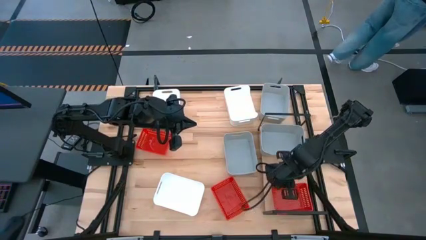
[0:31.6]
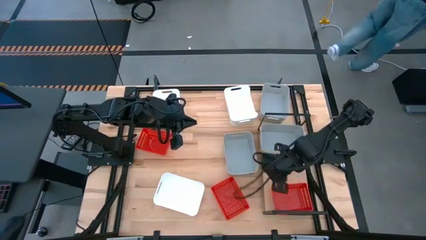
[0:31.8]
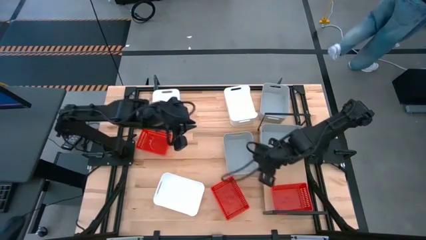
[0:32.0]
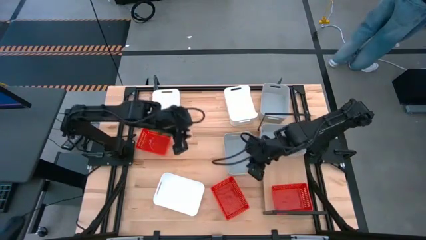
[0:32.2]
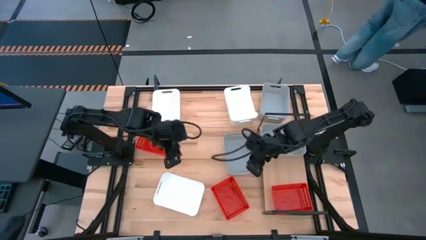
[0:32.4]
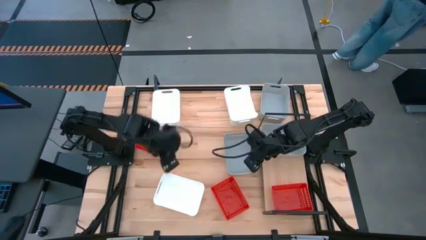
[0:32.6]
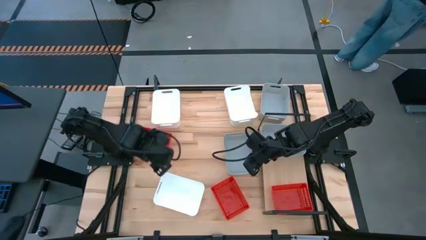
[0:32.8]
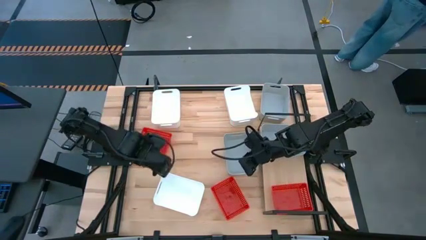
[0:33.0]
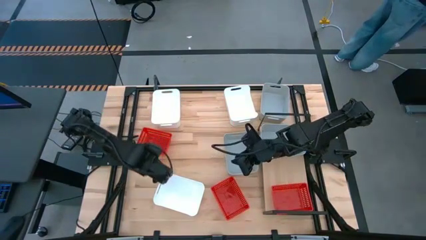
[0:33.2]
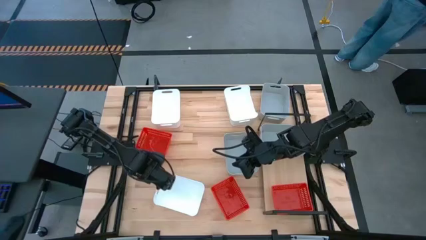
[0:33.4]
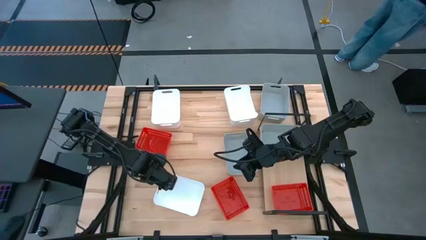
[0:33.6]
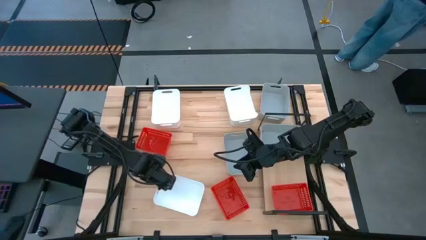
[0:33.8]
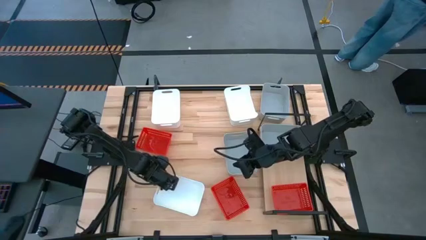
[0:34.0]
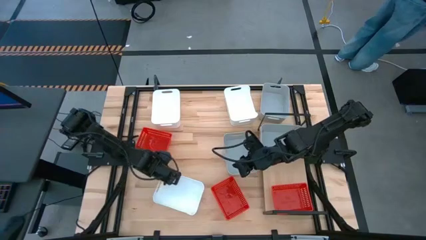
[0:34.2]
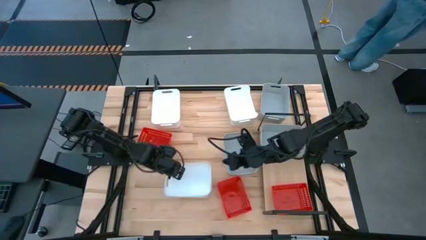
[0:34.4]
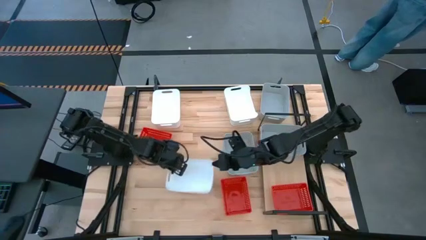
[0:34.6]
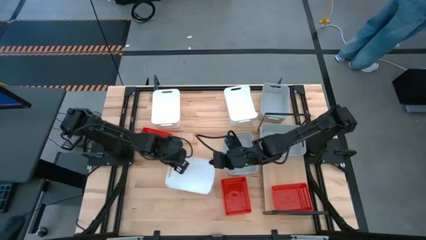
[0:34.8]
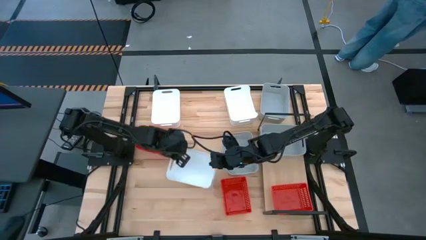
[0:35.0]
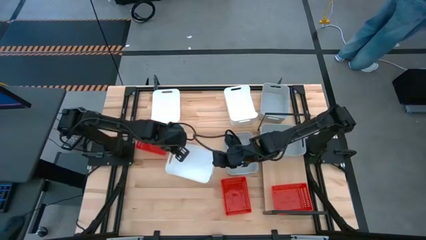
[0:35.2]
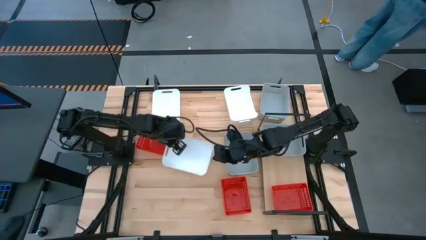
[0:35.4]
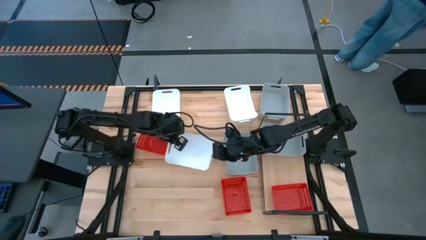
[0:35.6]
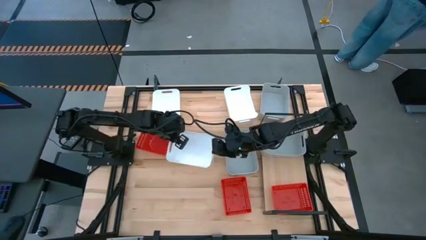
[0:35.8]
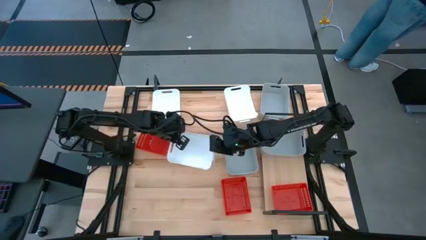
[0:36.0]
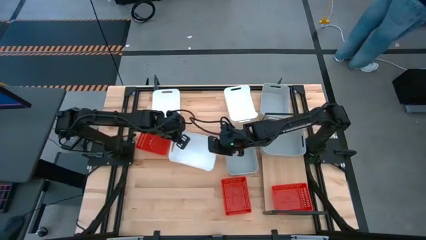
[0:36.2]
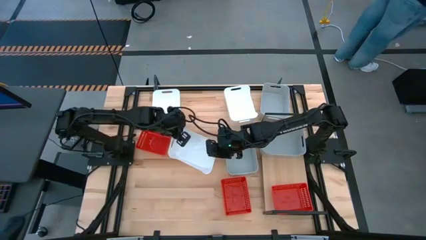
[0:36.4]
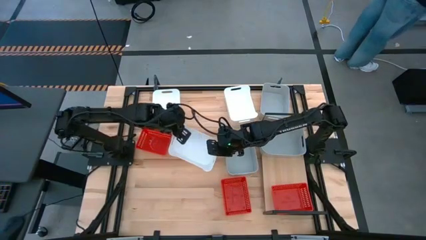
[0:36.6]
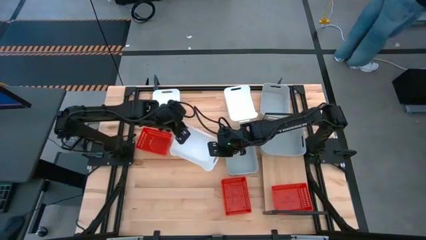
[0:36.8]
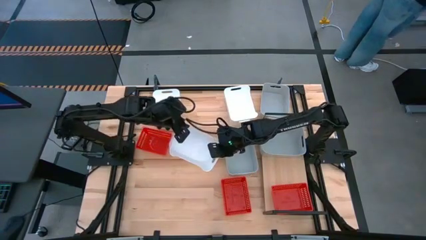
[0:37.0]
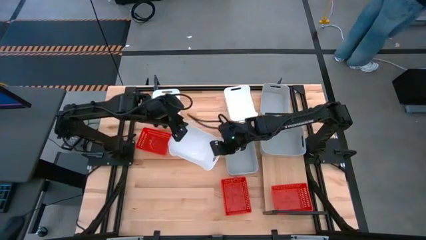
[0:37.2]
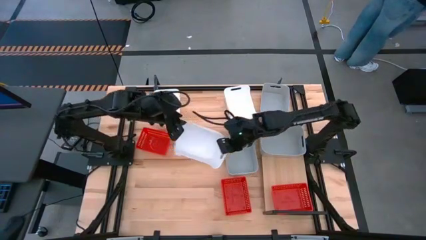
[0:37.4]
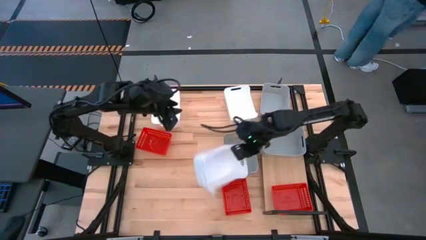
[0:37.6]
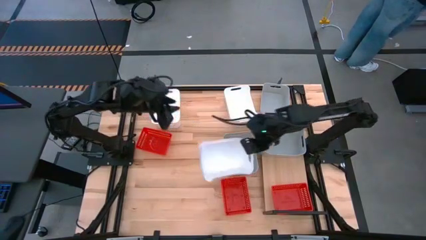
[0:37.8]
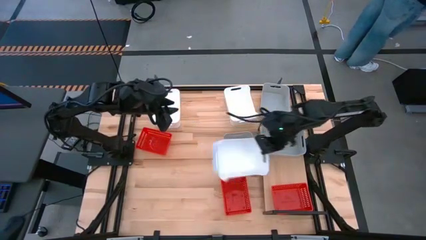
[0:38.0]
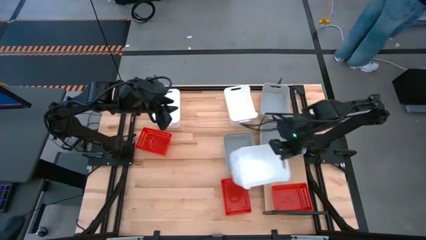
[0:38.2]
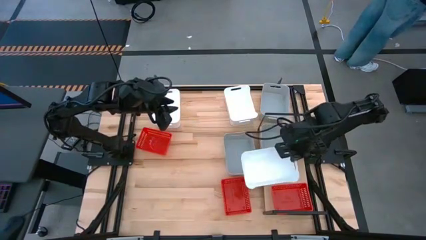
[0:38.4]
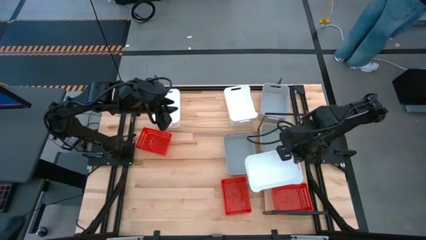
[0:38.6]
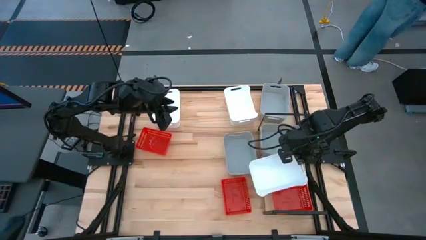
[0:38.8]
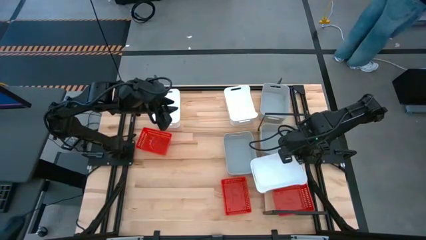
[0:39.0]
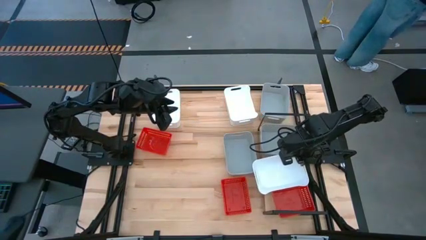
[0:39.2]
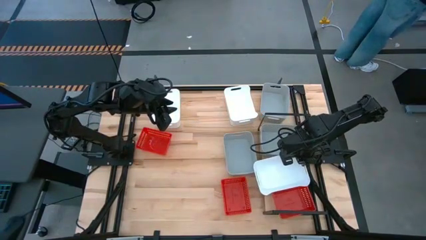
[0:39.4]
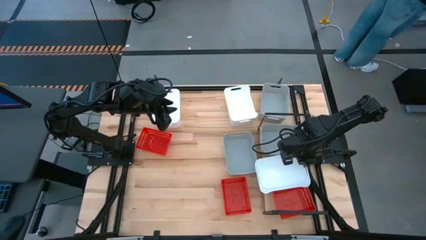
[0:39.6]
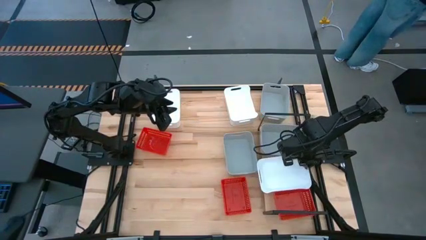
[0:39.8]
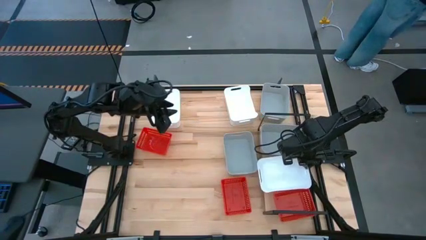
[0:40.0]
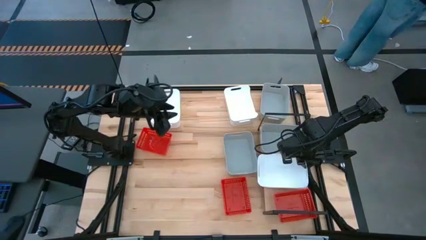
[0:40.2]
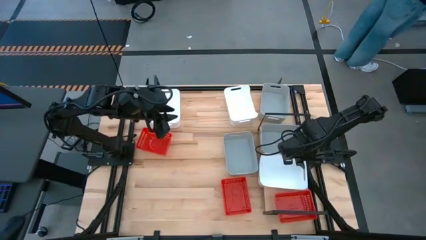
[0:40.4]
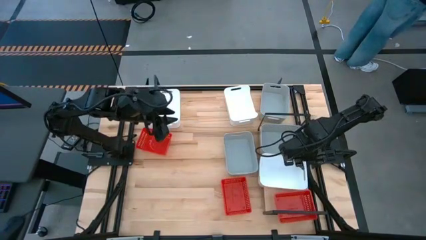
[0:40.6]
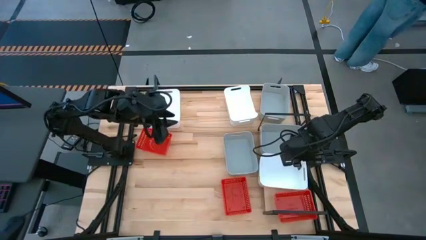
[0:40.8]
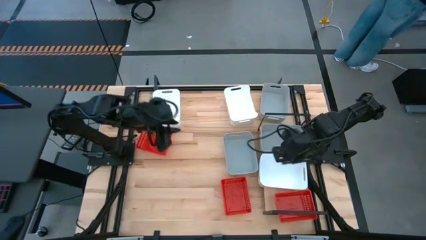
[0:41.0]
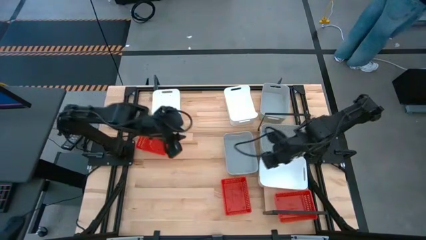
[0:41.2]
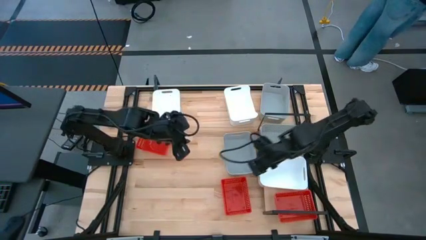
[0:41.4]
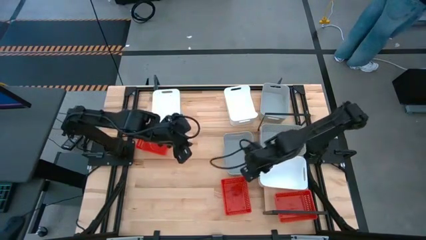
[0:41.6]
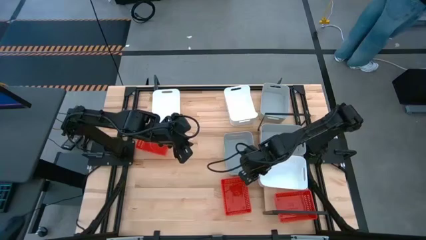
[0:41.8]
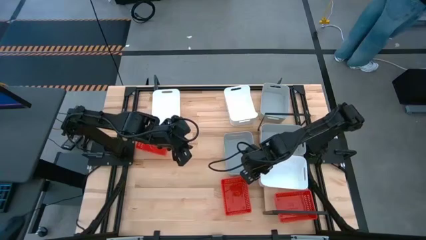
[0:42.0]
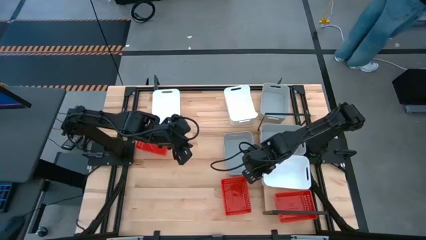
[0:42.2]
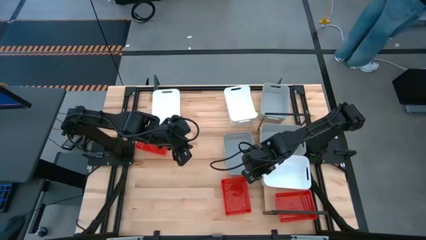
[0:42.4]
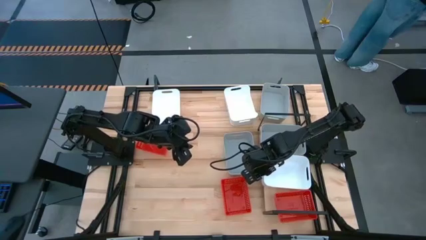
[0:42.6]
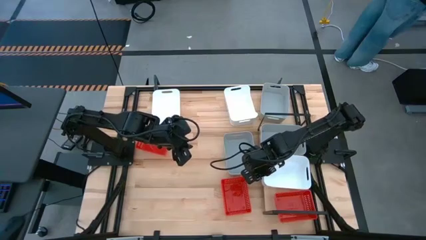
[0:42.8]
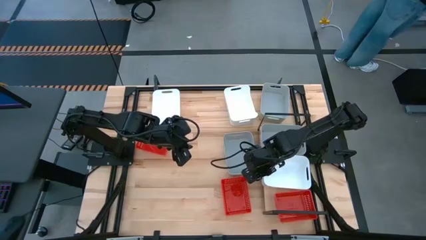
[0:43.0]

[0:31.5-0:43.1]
Task: Stack baskets on shelf by color
Put the bottom white bin on the shelf

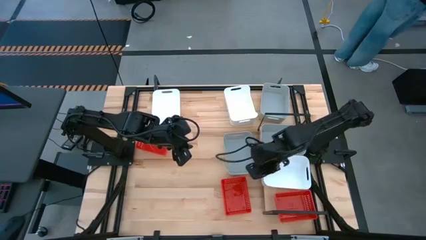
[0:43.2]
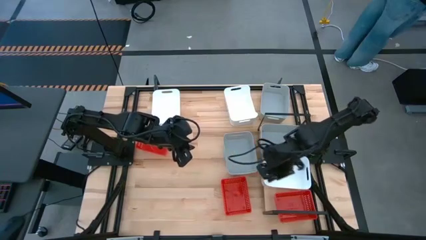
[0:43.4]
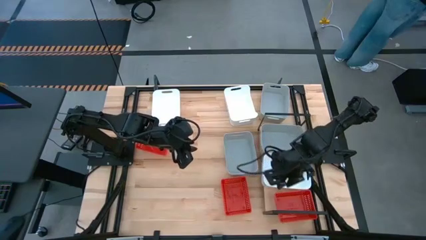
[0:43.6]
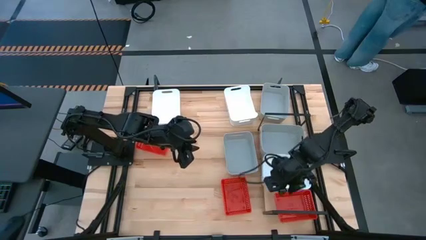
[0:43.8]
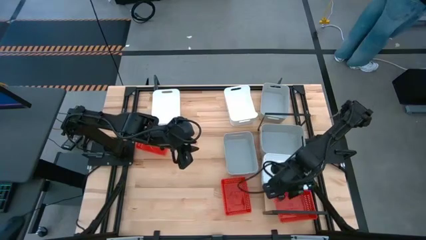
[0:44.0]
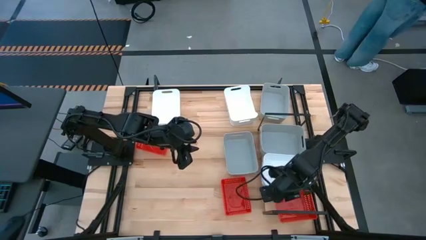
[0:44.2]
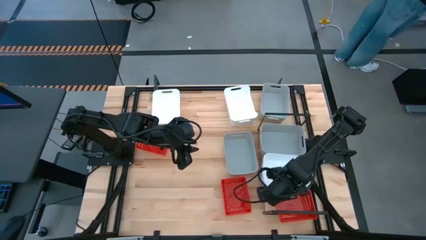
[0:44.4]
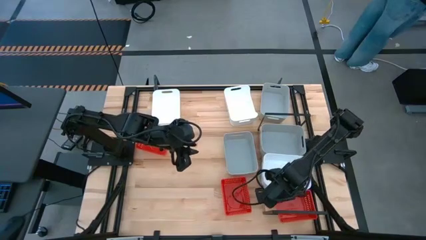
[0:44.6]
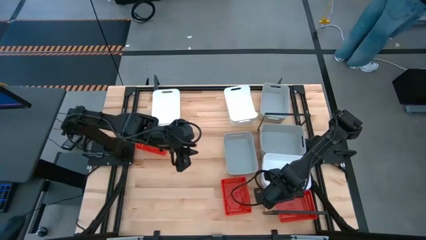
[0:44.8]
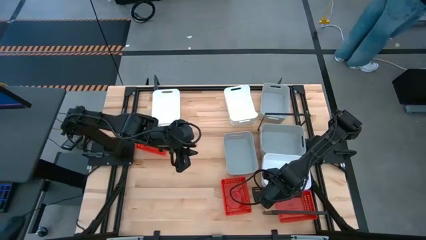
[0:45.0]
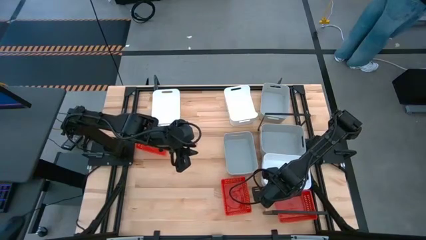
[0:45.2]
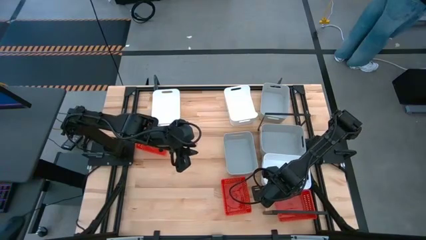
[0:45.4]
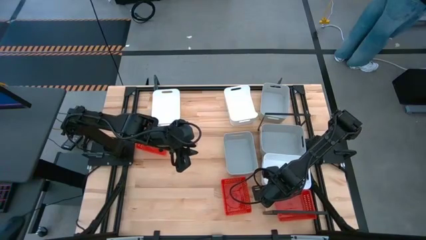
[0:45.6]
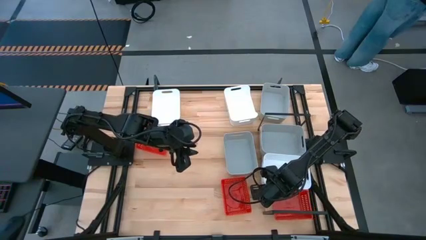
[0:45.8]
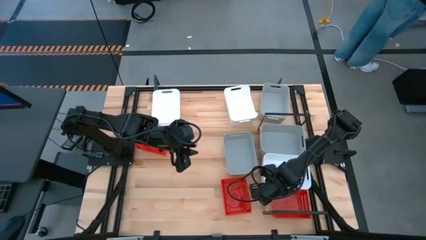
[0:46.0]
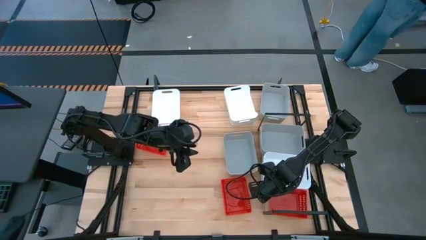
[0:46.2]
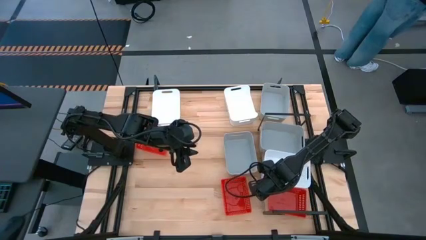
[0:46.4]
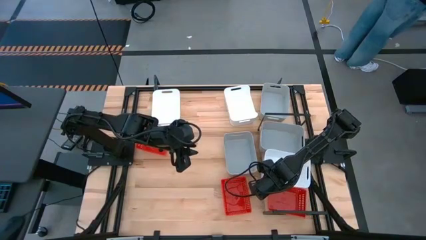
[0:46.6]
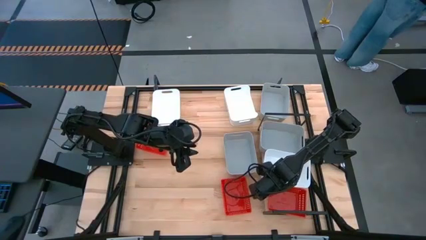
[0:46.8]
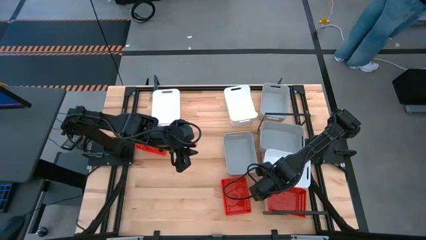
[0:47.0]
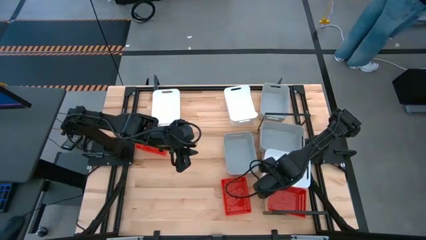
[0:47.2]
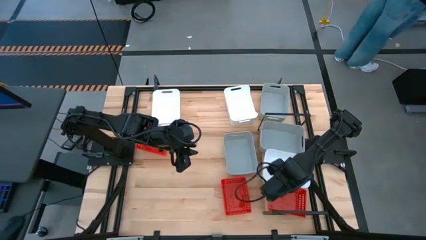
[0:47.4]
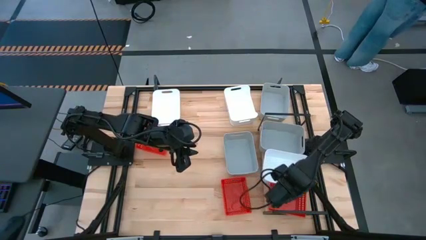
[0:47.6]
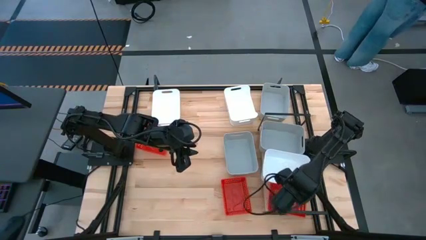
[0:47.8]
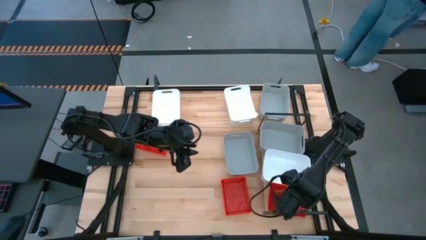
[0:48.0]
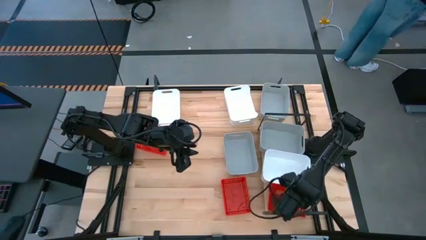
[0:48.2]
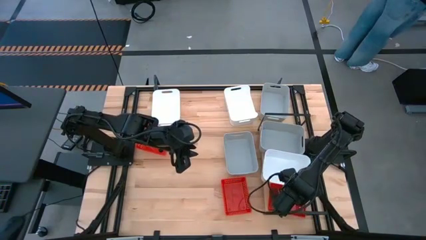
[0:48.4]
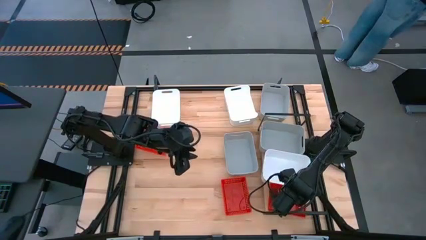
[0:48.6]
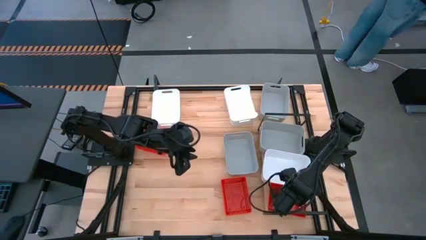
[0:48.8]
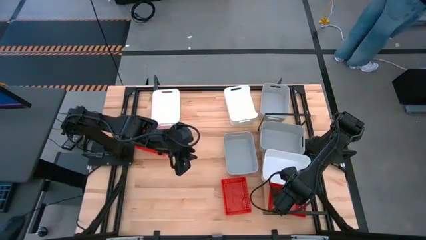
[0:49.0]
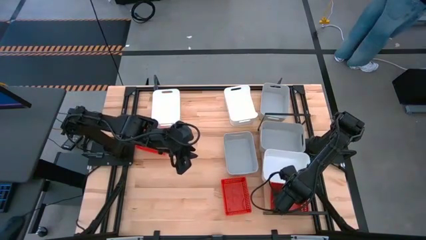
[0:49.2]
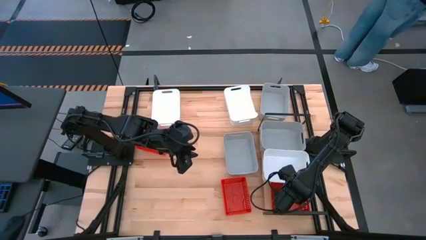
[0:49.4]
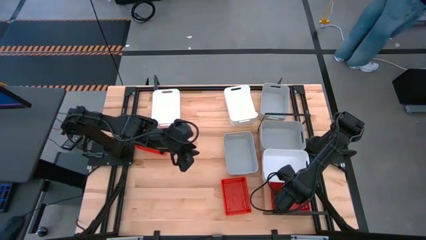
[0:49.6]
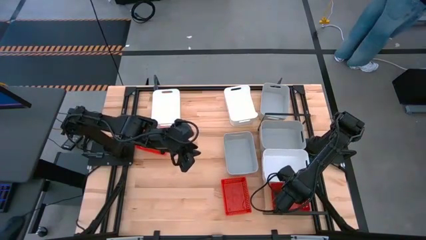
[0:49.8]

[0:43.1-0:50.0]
Adjust the red bin on the shelf
